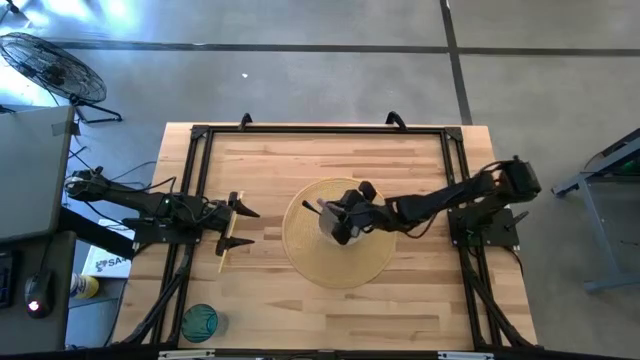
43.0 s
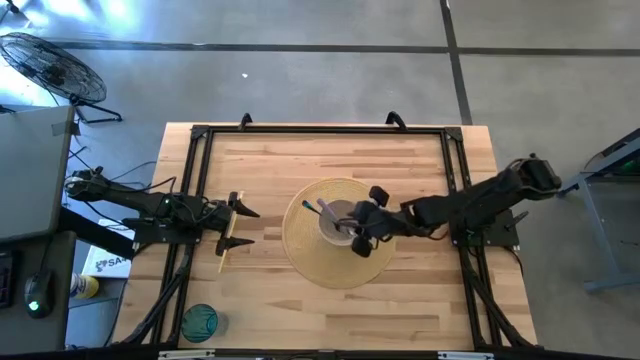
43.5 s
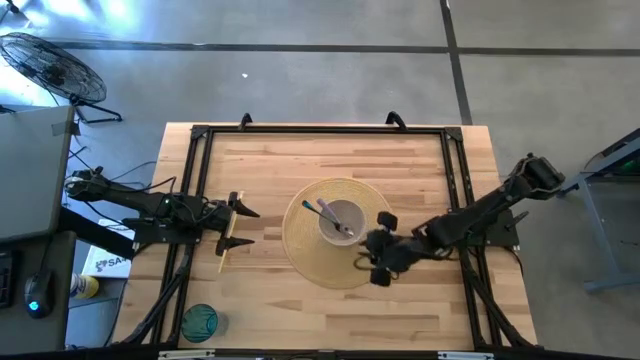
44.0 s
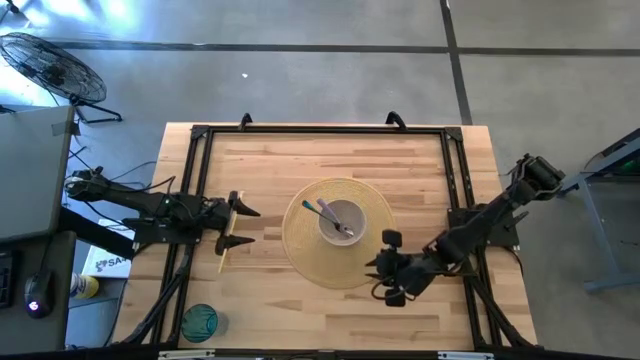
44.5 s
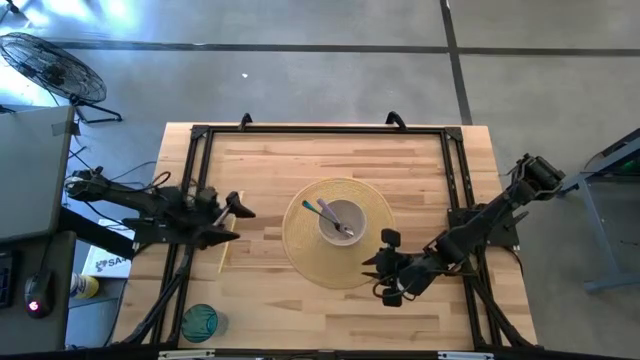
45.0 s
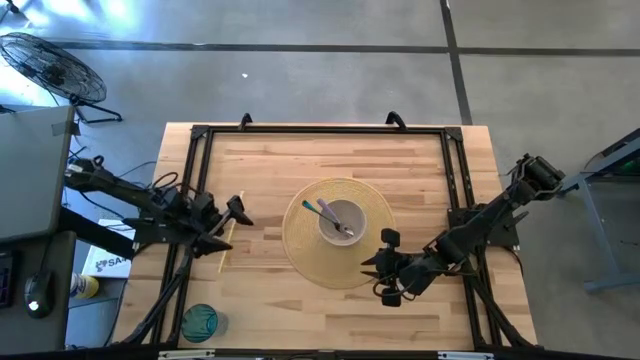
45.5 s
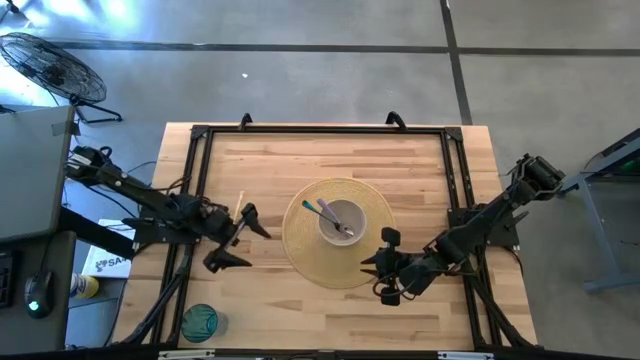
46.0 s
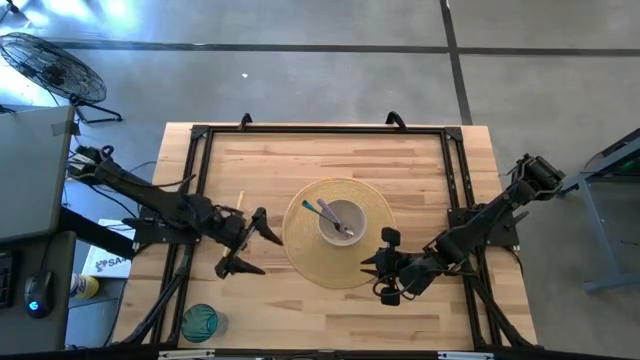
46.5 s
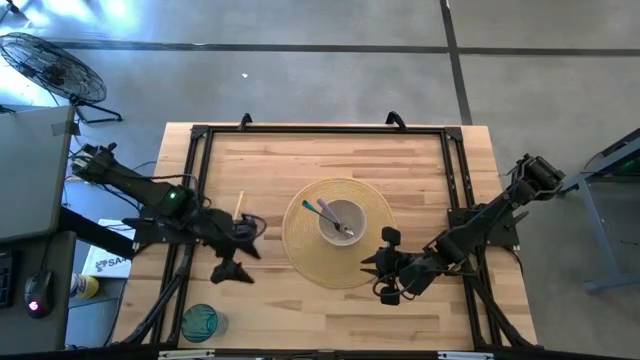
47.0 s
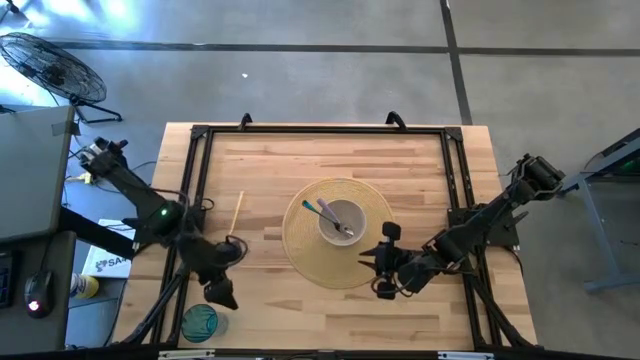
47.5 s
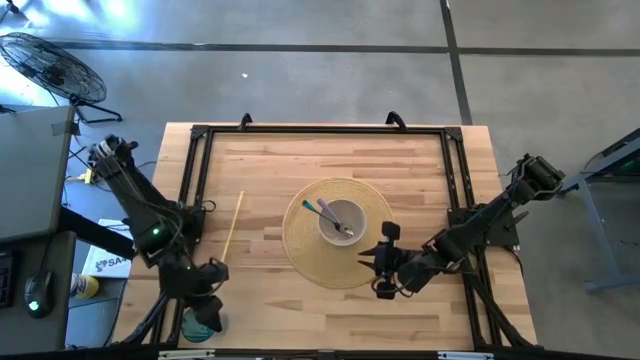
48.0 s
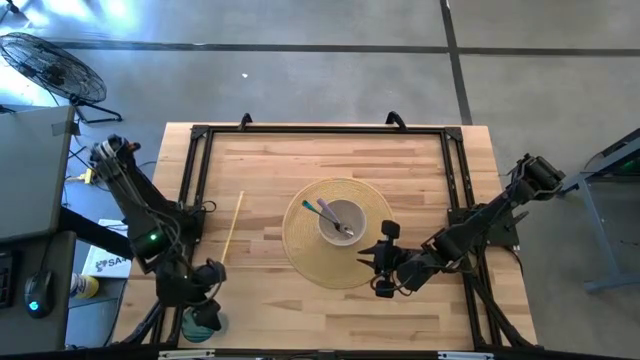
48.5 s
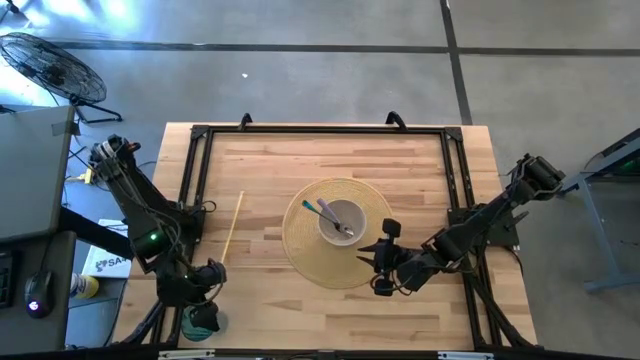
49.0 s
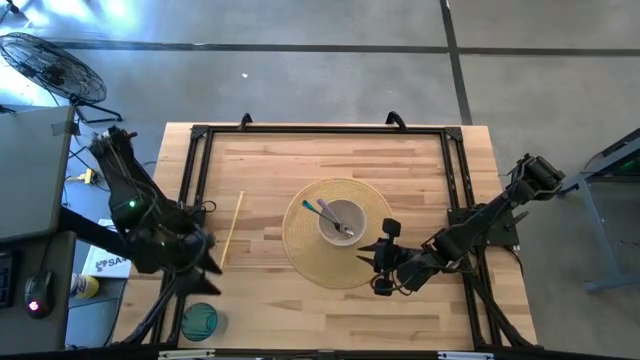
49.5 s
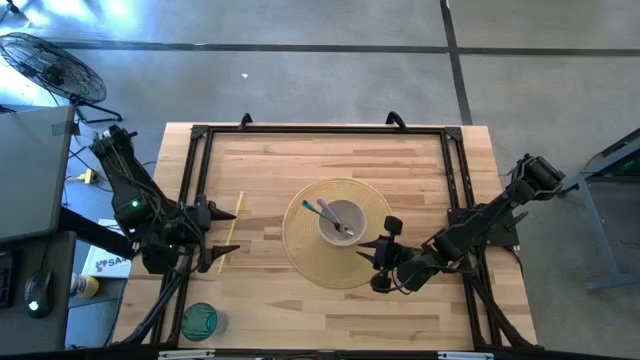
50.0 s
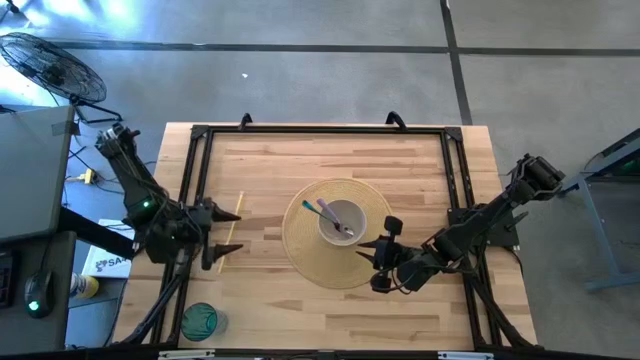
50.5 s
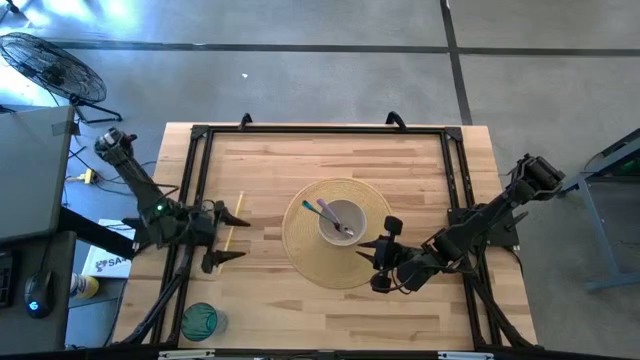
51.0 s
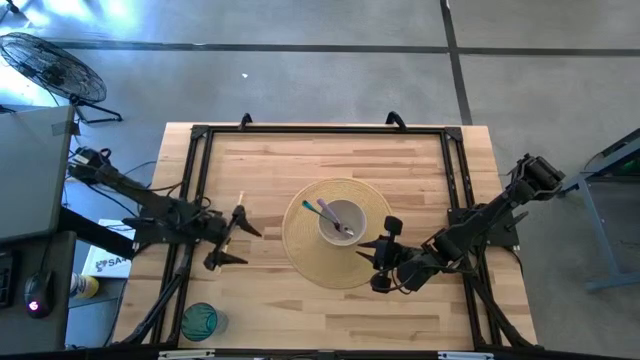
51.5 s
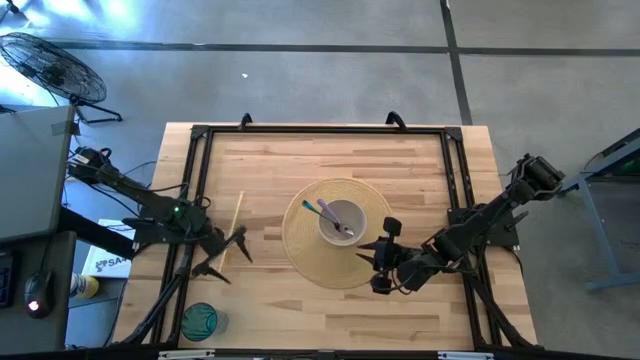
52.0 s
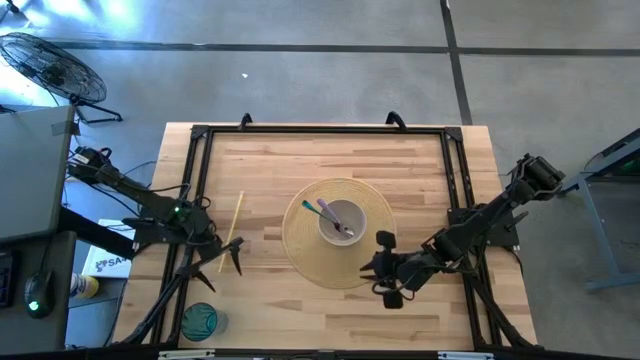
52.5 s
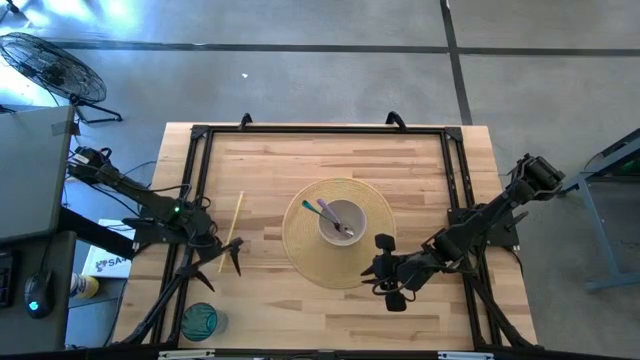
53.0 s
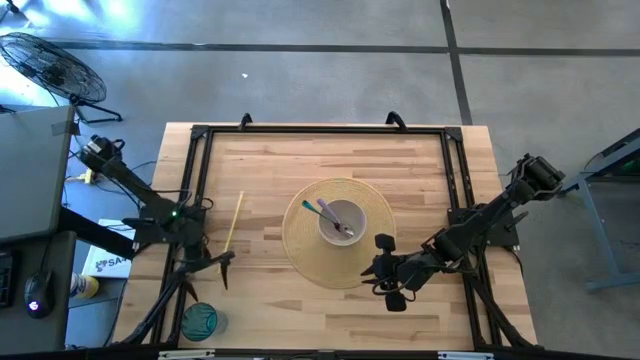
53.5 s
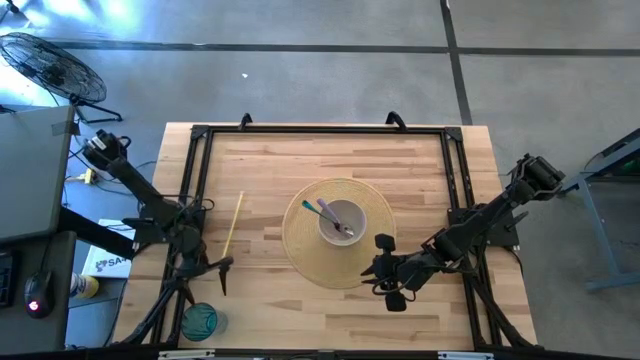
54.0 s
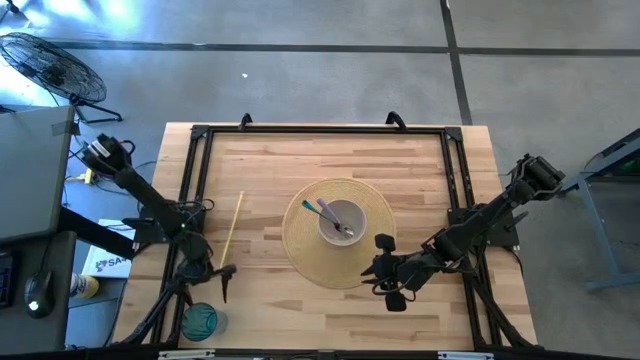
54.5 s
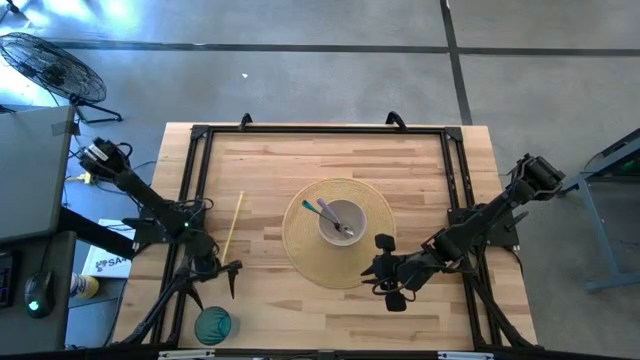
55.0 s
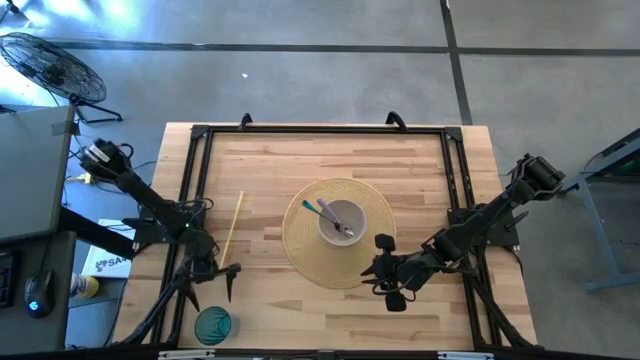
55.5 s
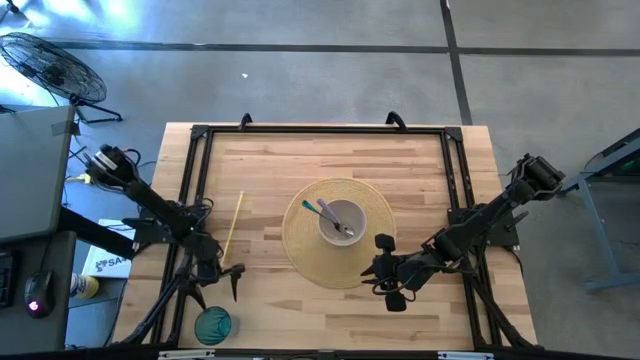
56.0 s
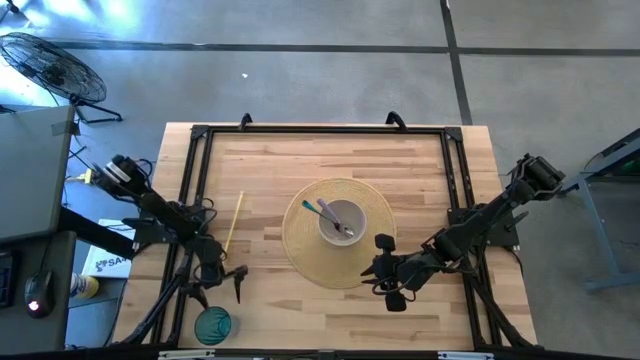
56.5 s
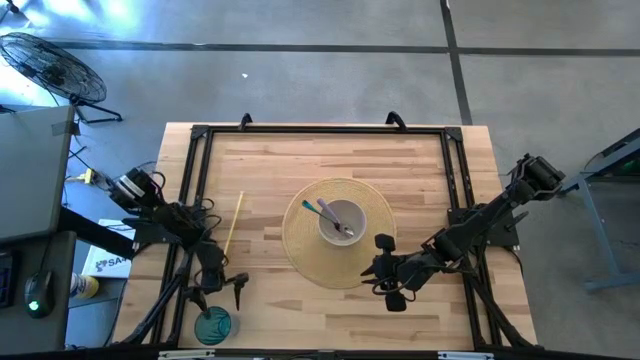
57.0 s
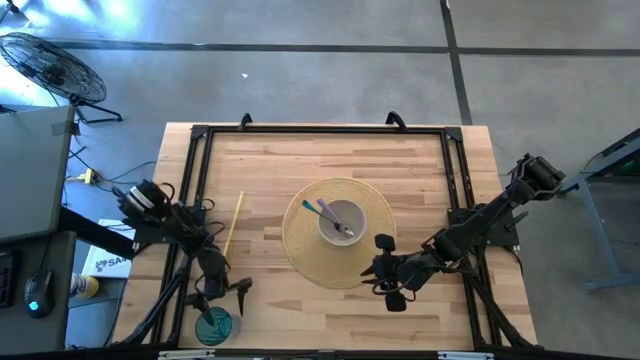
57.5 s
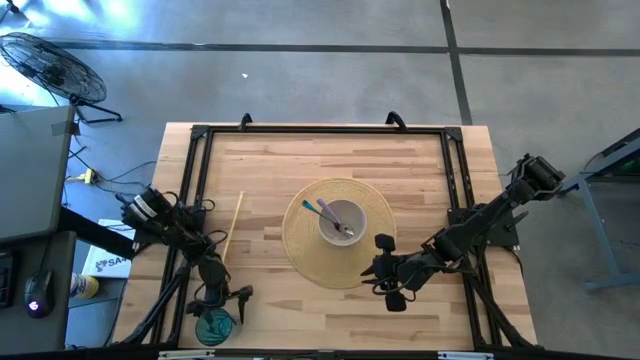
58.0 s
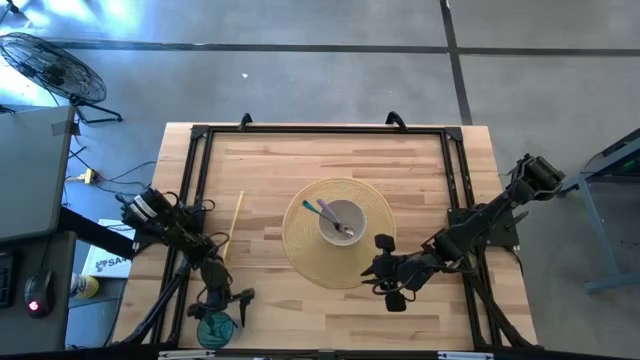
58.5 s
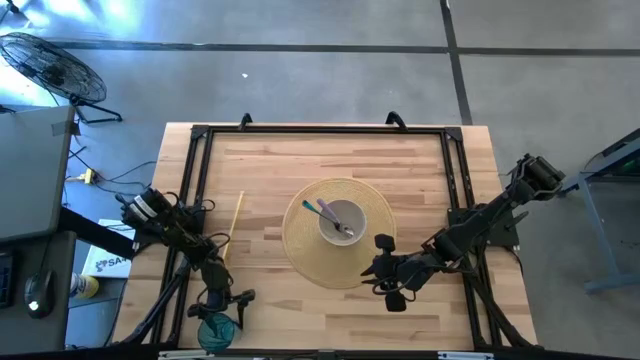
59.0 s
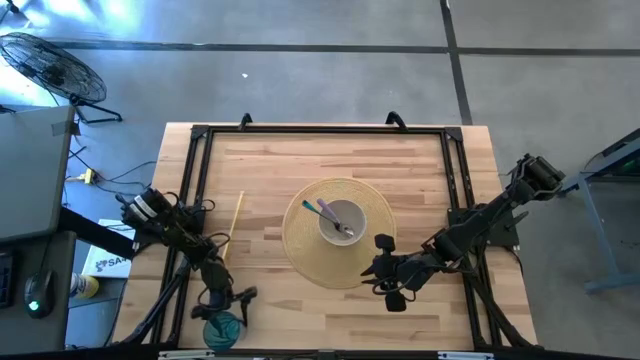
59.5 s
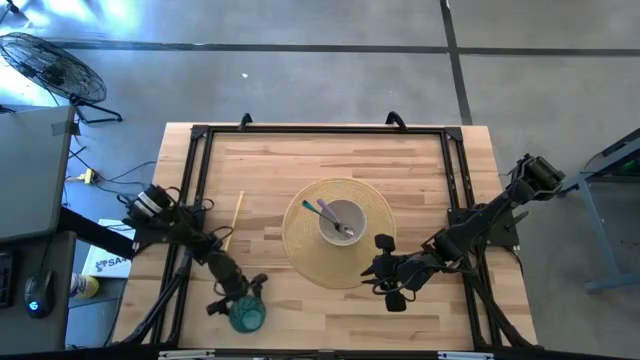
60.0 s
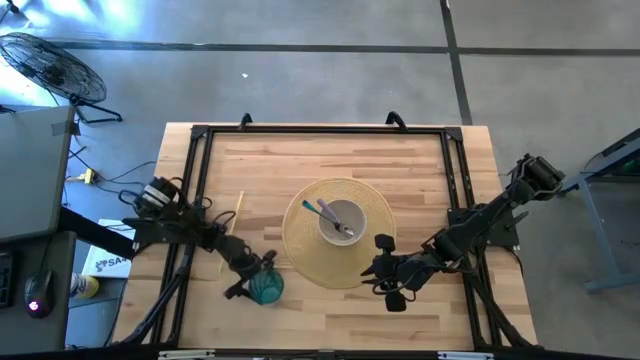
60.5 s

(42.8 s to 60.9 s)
Task: Pick & Place Utensil
Put the green cup to the top right of the white bowl on the table placemat

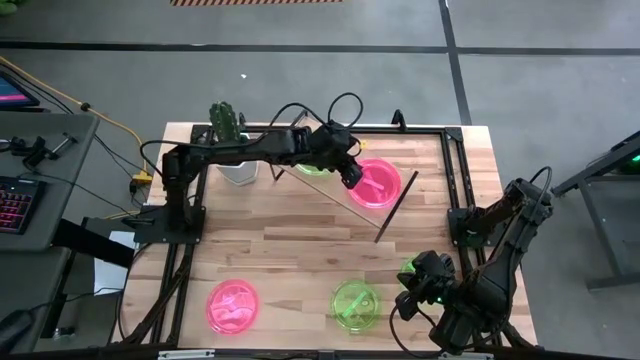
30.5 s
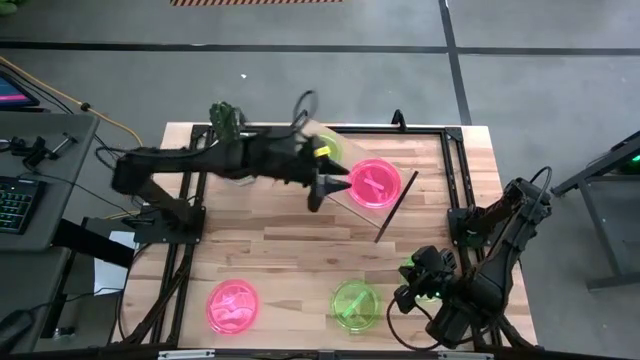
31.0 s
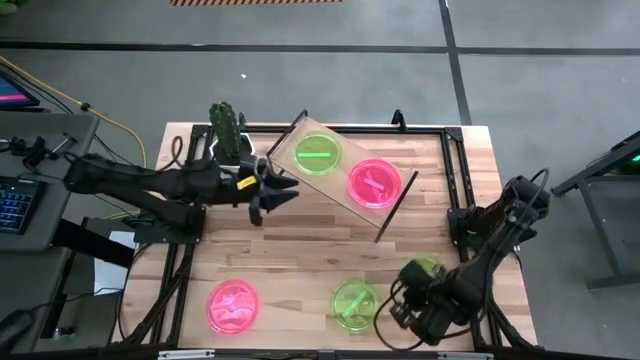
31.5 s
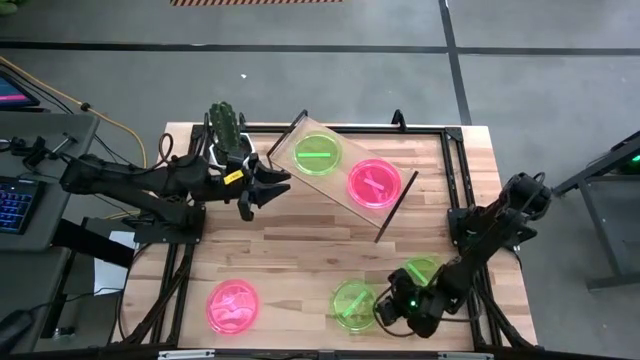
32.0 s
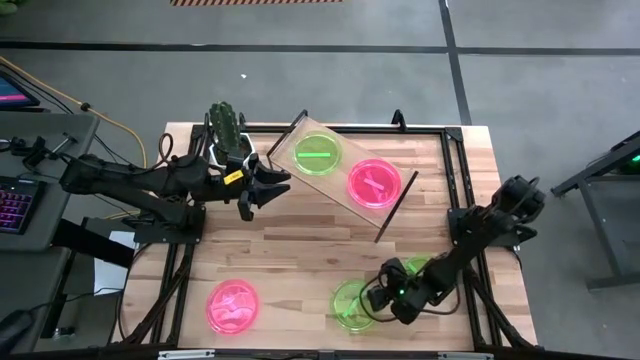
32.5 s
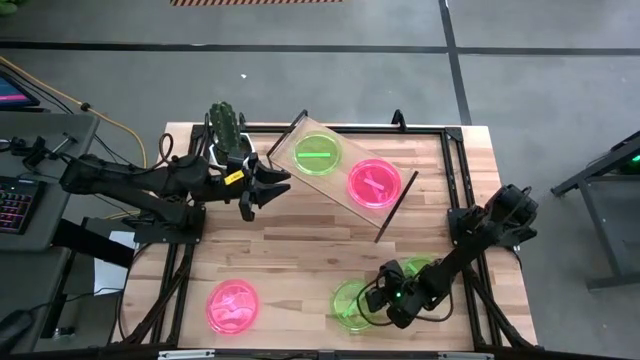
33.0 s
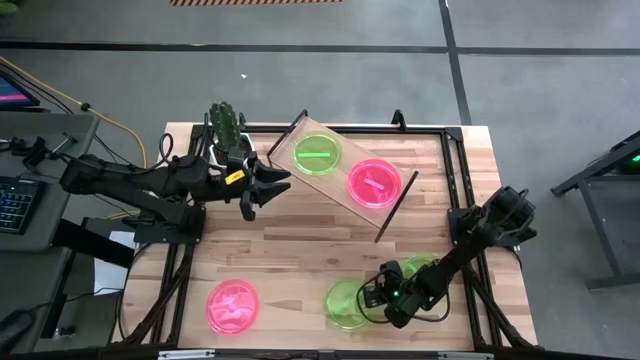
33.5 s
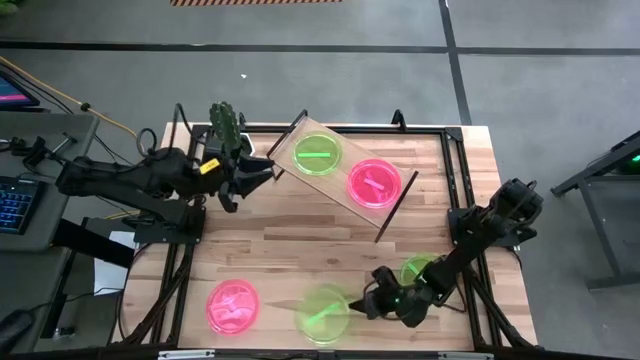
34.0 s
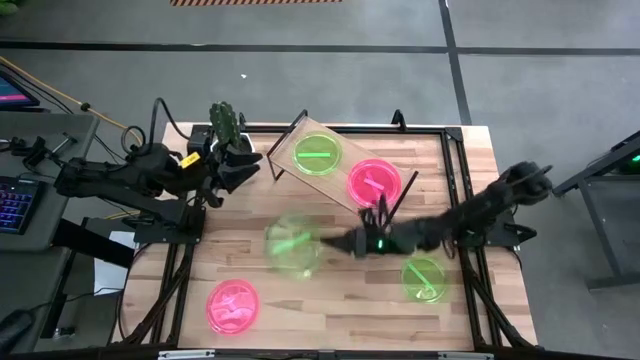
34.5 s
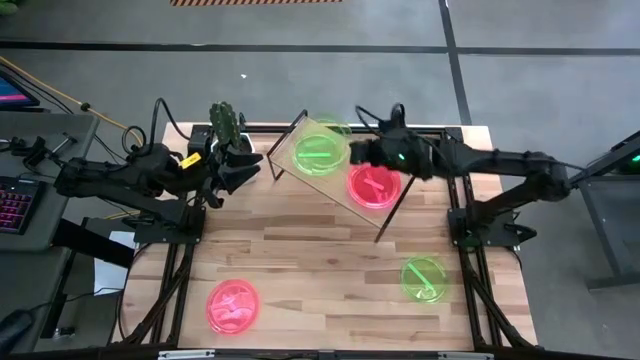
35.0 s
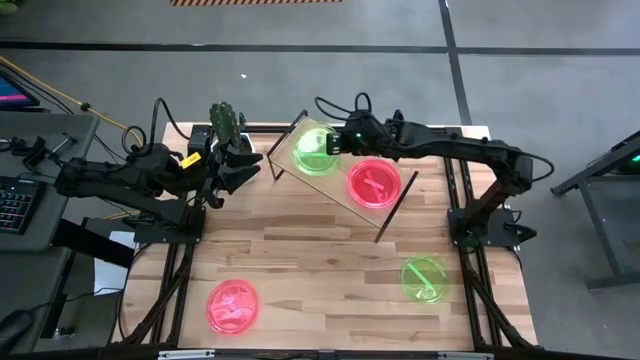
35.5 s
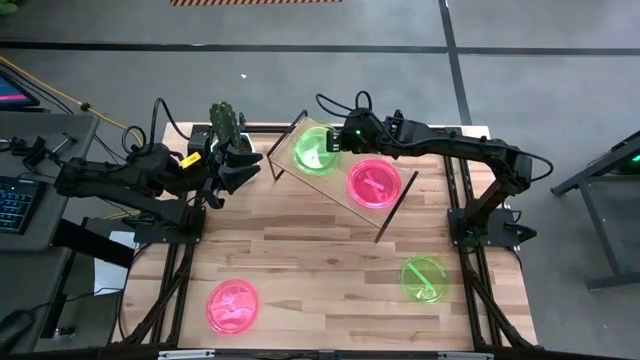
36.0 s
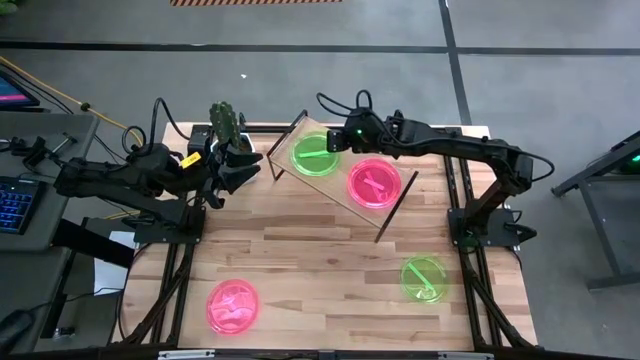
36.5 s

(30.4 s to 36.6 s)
Task: Place and stack plates onto a shelf
Stack the left light green plate on top of the light green plate on the shelf
